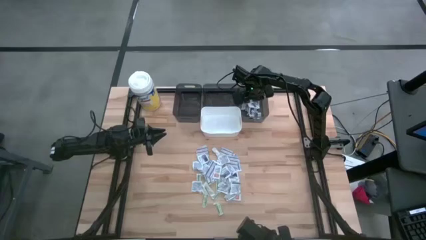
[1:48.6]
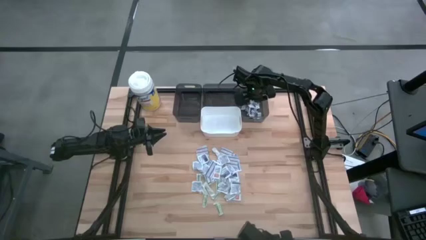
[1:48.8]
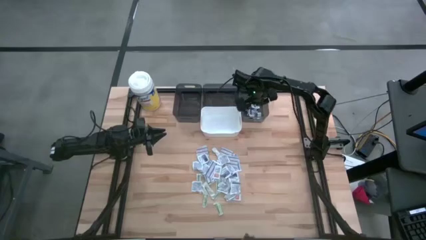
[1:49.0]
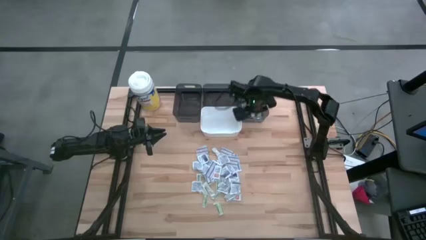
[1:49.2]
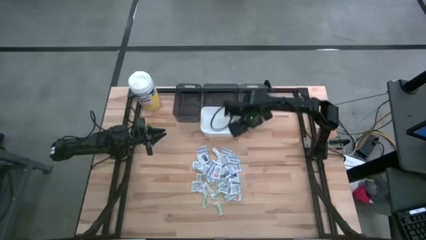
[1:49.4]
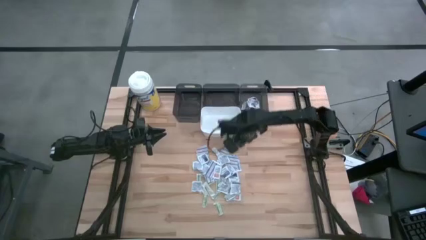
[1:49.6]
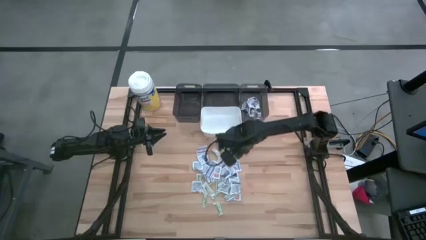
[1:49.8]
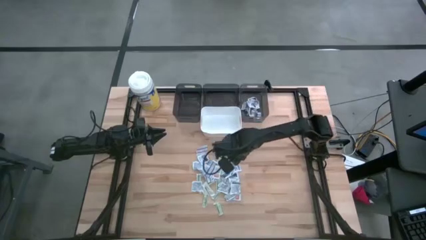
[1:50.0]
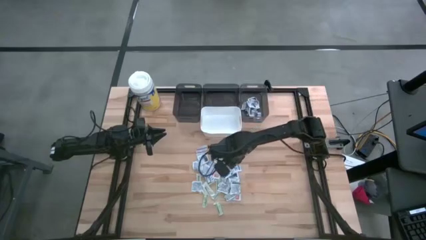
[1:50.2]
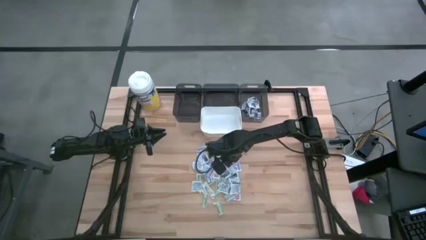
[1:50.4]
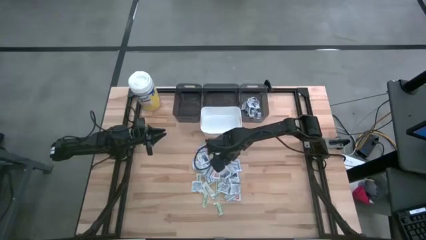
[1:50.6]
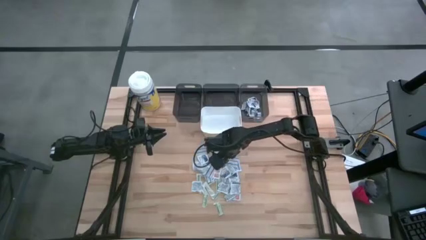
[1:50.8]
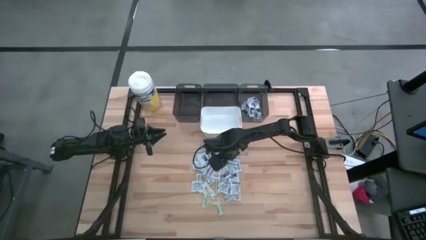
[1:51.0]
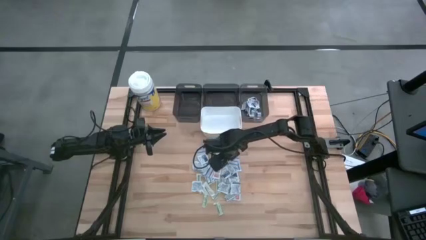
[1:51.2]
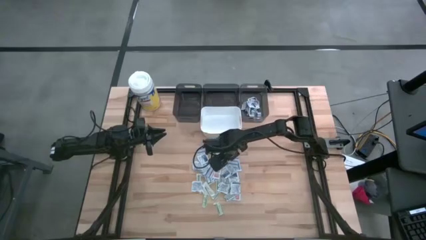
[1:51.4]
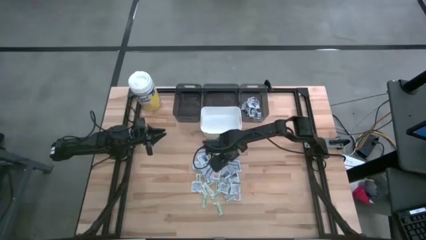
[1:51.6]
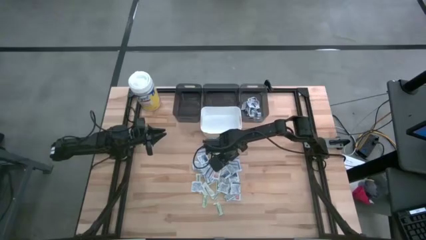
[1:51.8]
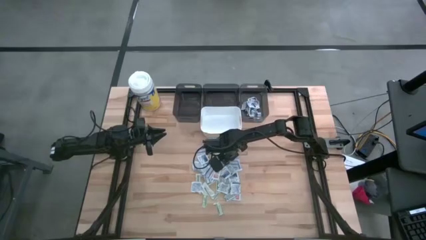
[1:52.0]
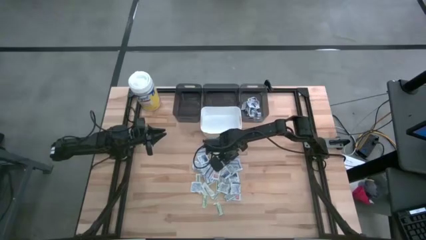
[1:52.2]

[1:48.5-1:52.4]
Task: Pick & Place First Aid Supplies
Put the blue alcohol pad into the right black bin

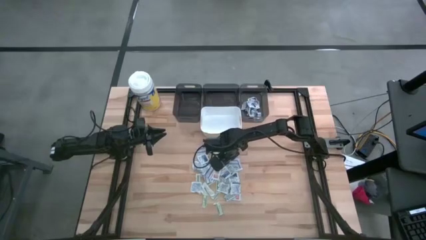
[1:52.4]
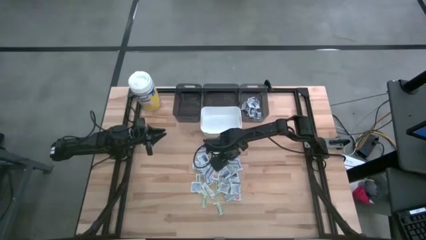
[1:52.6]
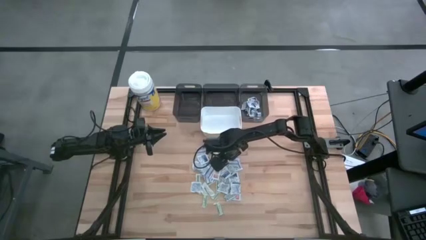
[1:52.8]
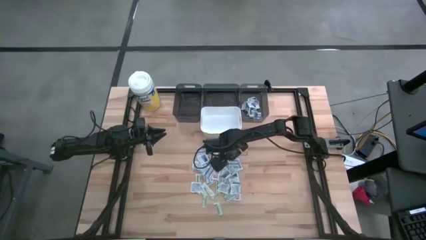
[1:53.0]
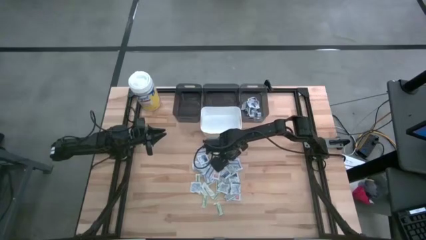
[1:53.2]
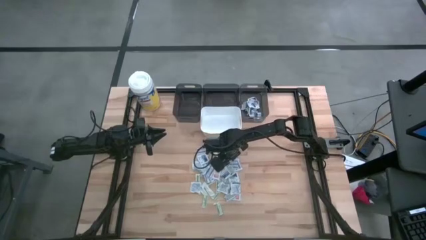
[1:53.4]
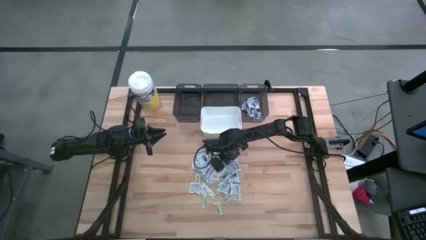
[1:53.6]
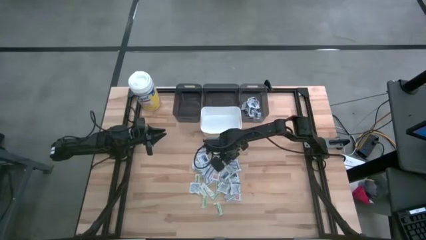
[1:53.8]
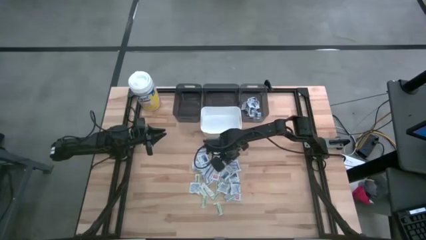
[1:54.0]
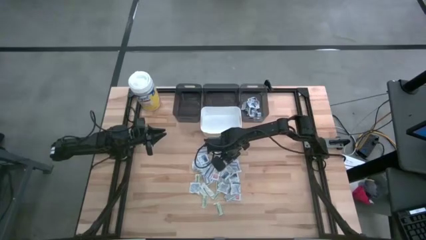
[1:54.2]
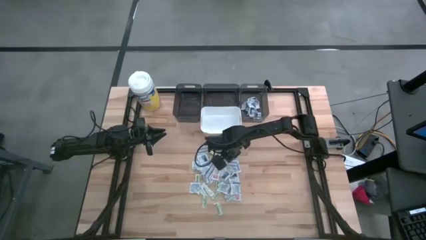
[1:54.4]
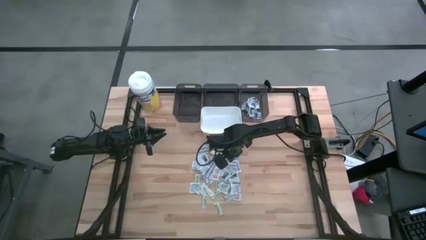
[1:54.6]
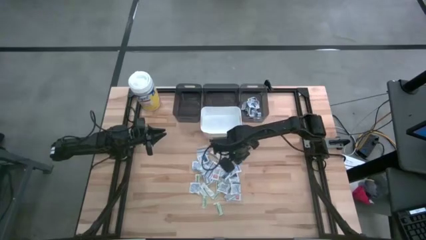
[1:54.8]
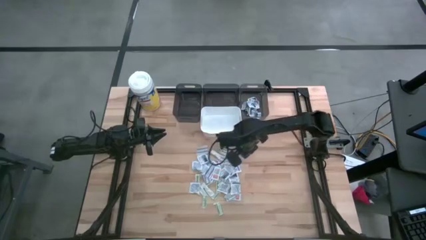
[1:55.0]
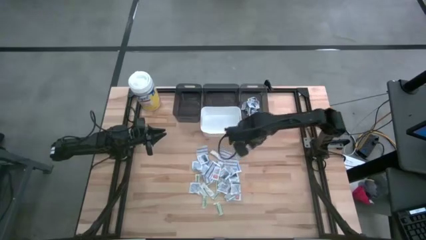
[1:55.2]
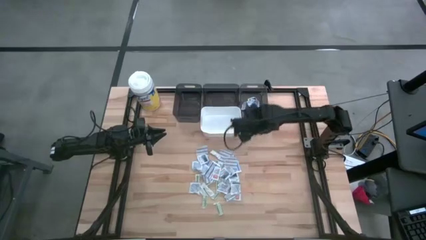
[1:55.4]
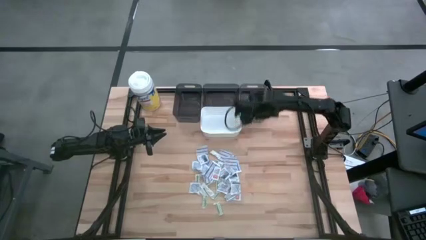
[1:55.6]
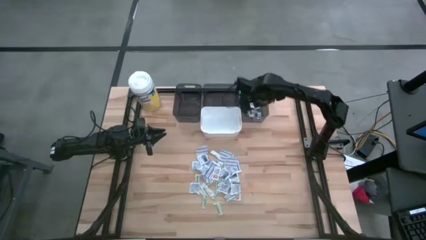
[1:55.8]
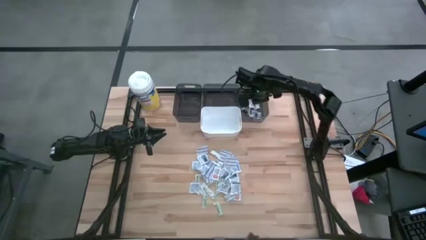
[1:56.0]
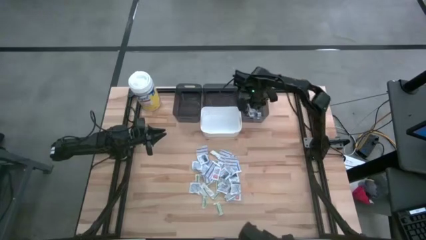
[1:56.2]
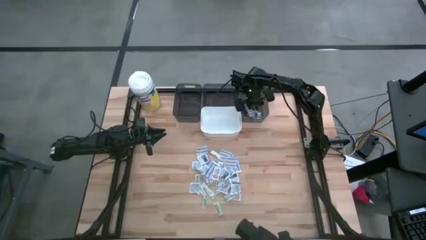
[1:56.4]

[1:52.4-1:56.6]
Put the blue alcohol pad into the right black bin

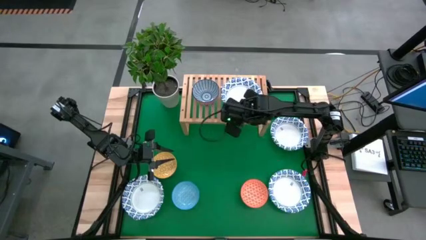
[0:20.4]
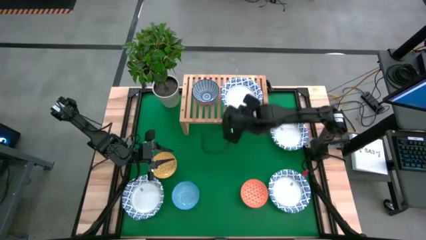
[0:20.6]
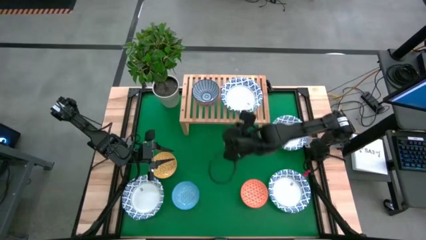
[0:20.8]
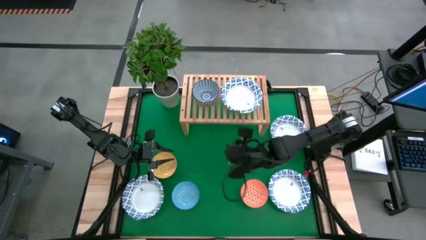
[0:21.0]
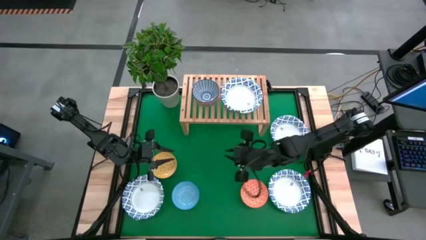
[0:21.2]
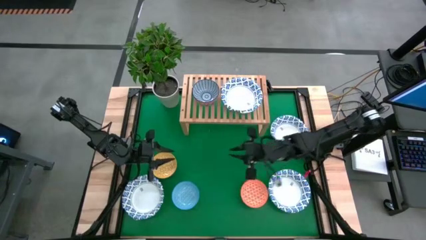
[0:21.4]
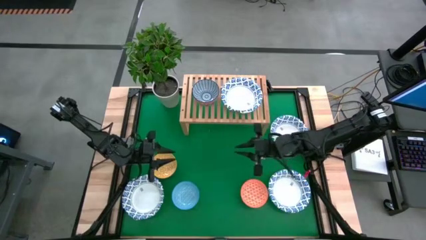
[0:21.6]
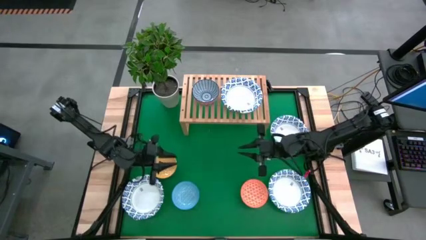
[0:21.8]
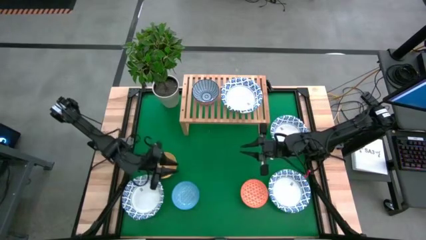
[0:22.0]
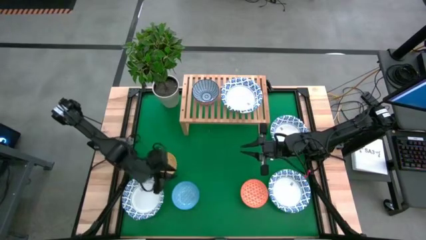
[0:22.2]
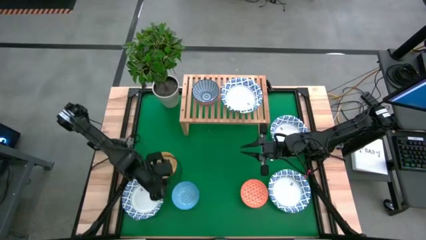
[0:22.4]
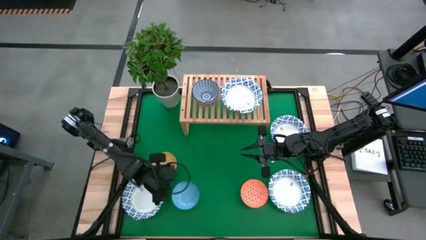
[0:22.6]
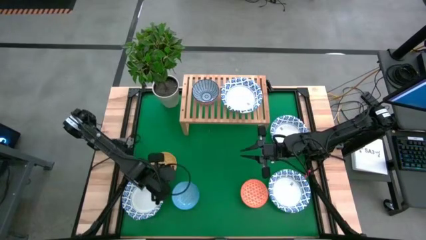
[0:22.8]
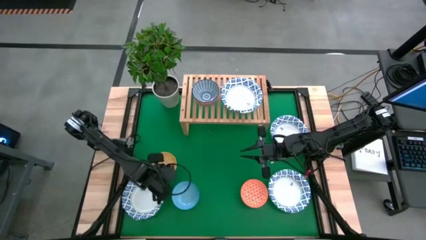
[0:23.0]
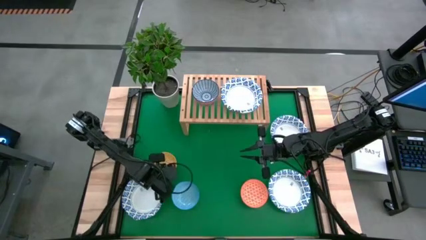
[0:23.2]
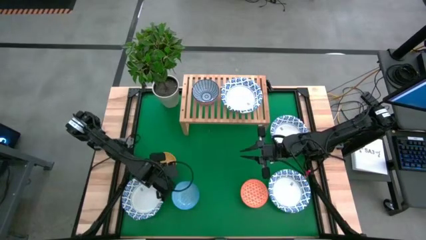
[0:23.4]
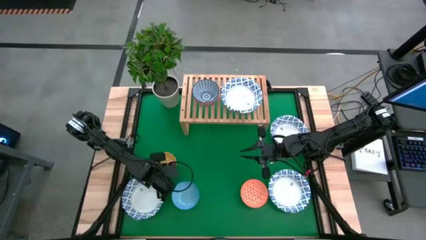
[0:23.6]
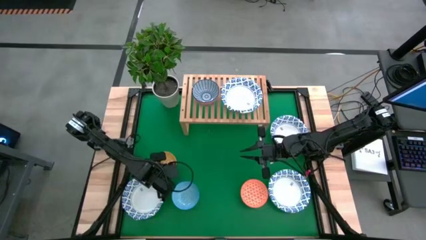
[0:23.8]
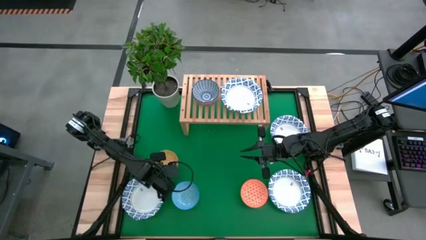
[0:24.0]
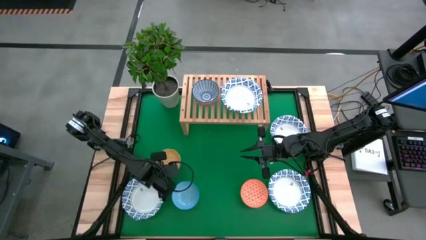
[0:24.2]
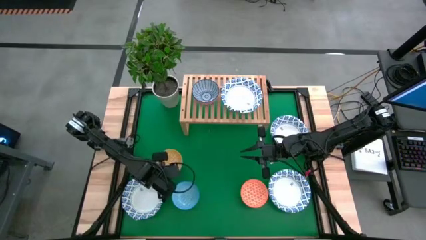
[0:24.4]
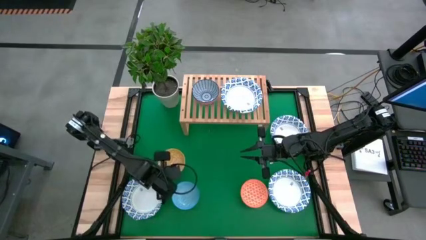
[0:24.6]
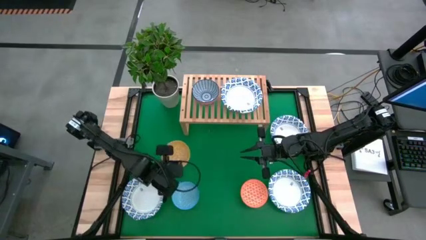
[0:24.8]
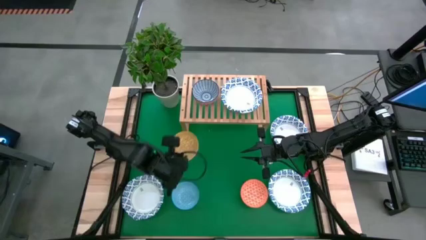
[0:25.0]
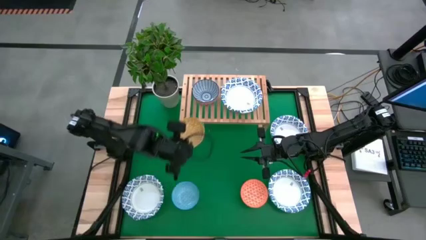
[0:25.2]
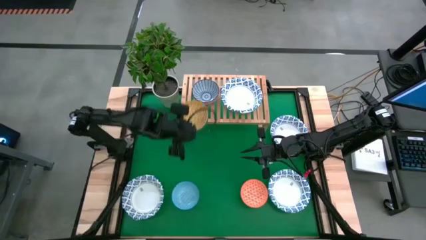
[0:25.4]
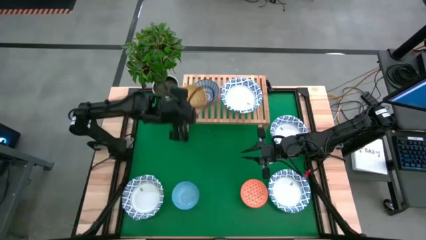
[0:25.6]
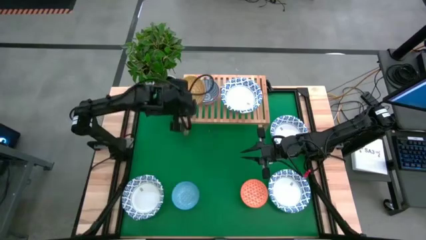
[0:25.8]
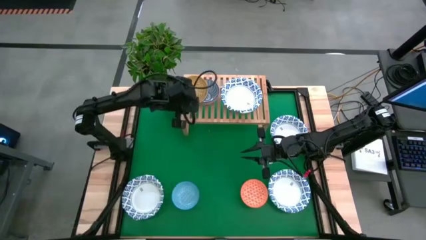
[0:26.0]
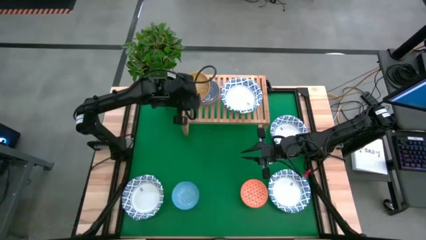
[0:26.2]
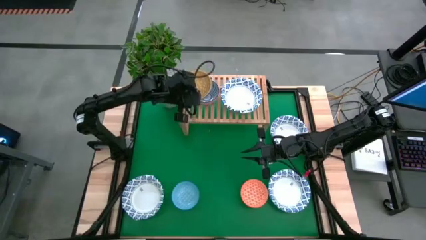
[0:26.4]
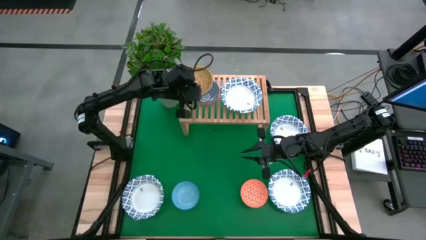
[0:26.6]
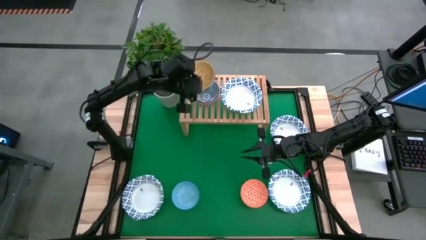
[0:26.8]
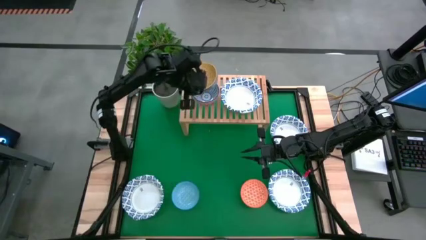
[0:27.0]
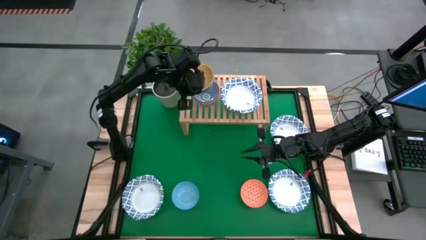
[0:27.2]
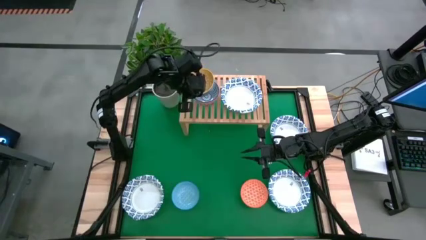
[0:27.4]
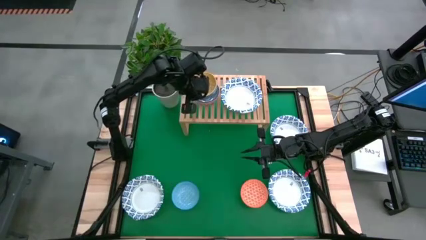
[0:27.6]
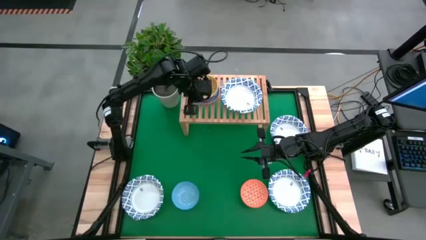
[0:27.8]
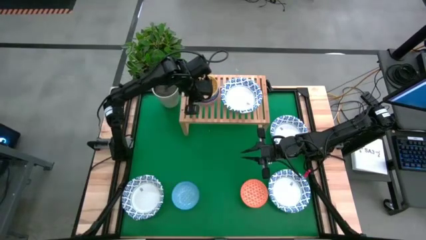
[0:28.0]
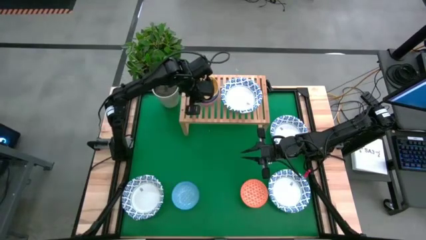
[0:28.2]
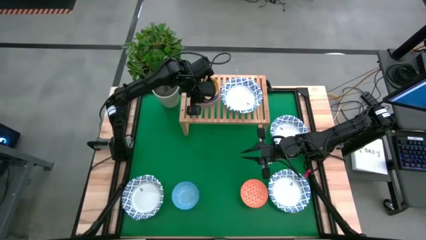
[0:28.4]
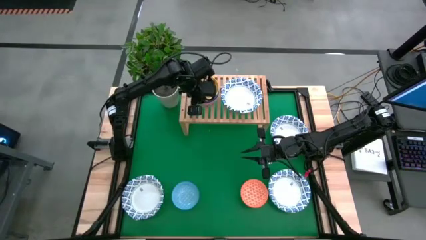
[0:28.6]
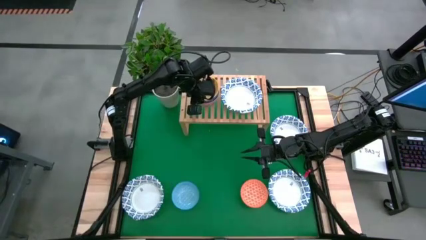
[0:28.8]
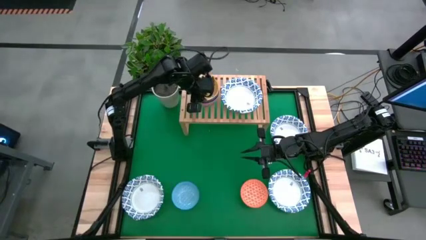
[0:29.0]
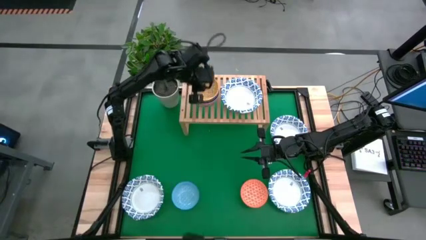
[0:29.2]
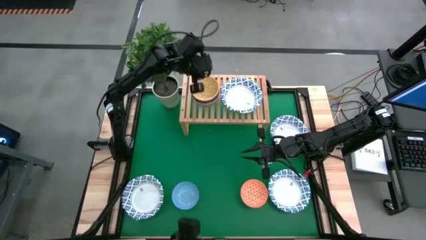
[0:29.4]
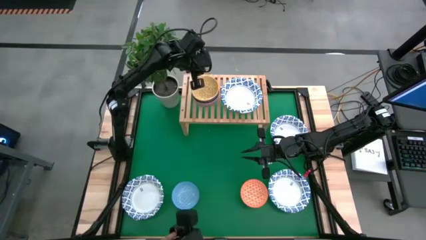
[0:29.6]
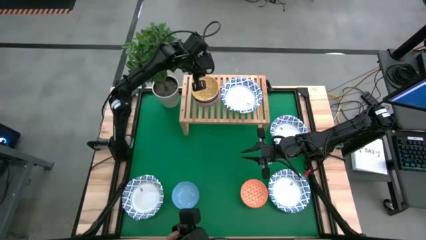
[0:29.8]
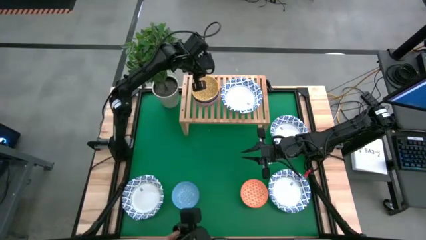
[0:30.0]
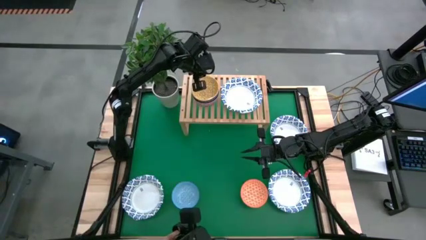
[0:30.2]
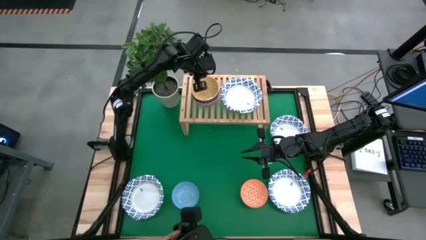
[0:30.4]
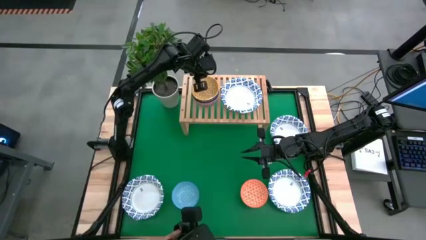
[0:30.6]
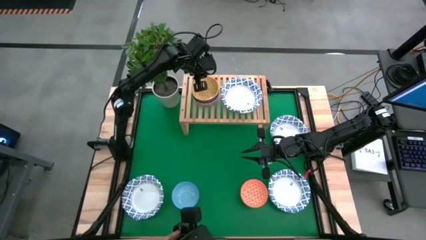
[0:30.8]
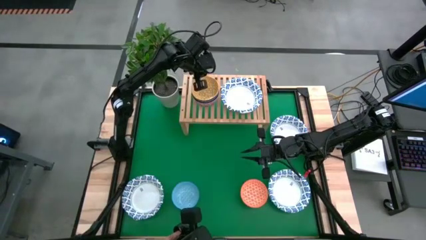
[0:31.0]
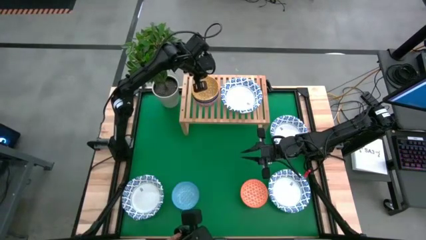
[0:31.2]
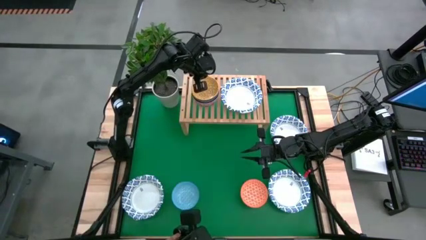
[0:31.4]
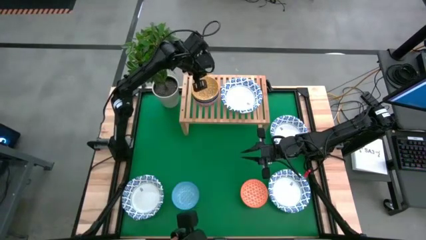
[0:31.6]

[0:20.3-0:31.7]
Task: Place and stack bowls onto a shelf
Stack the yellow bowl on top of the blue bowl on the shelf
